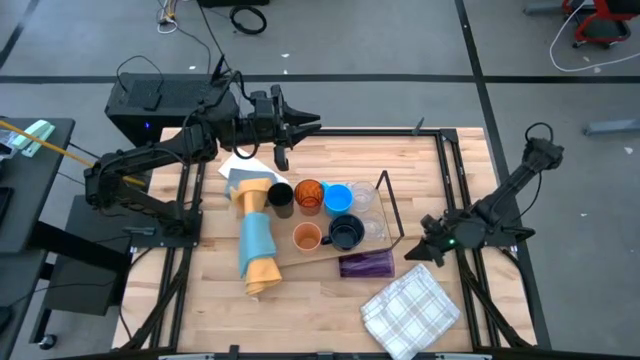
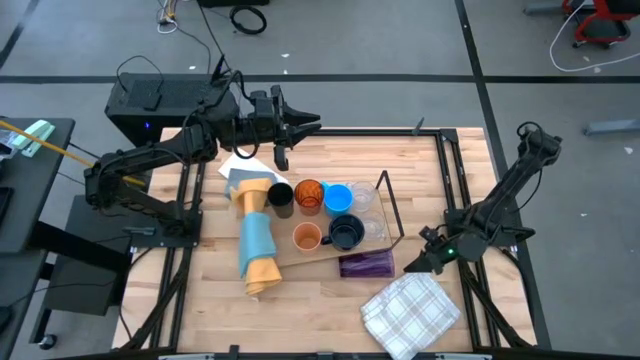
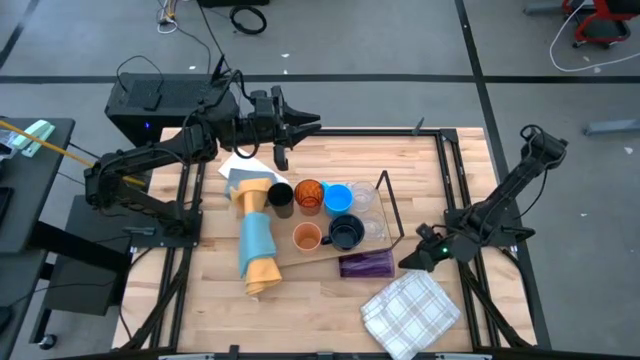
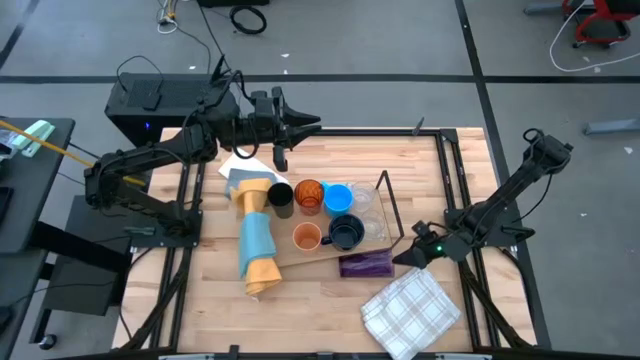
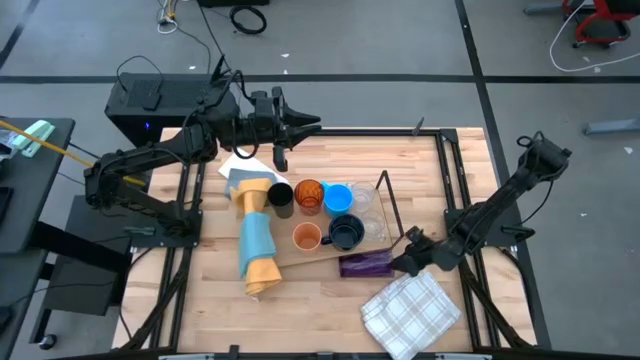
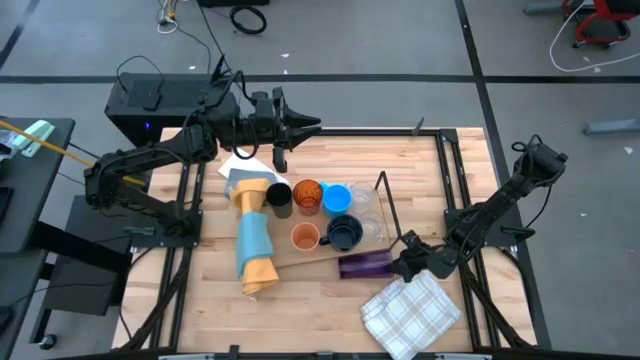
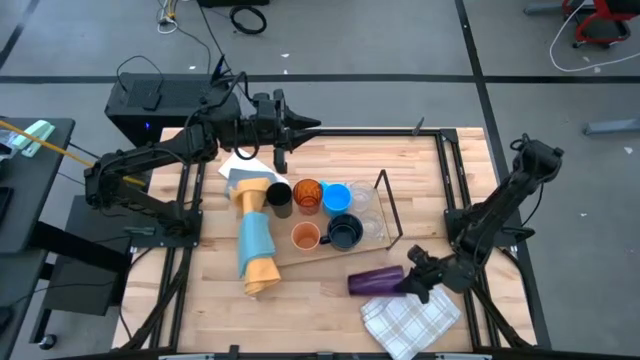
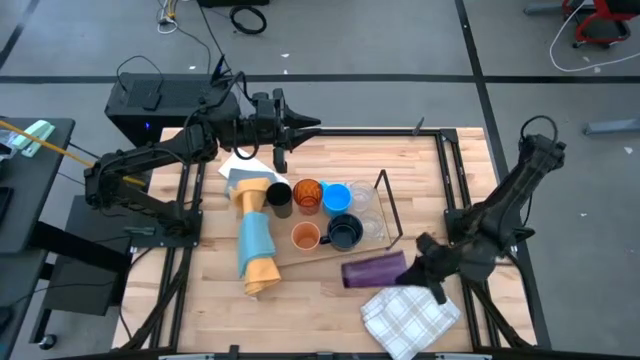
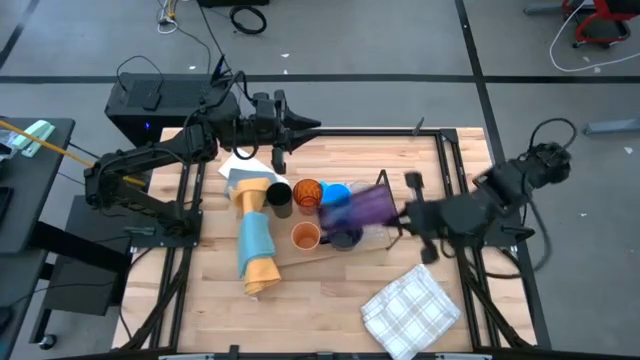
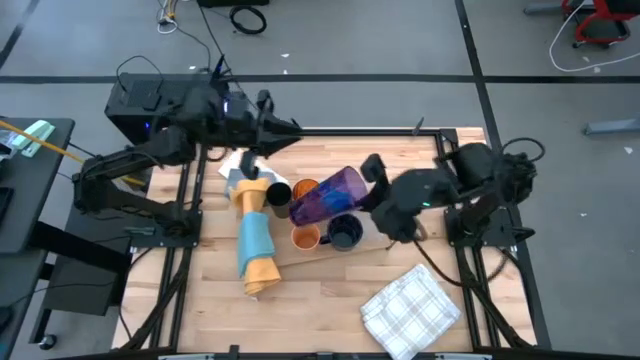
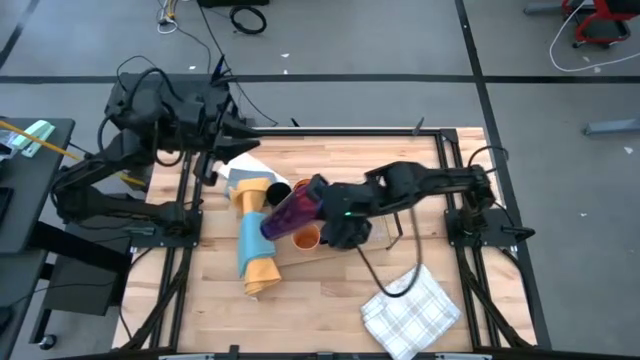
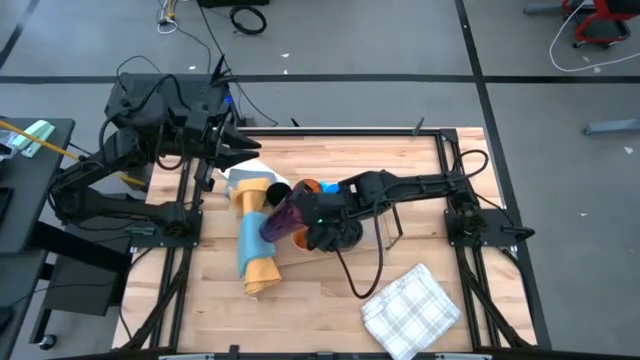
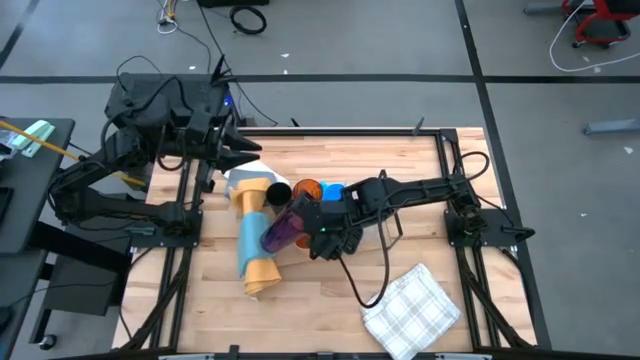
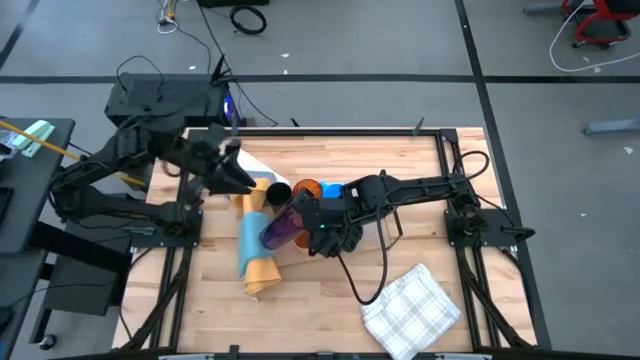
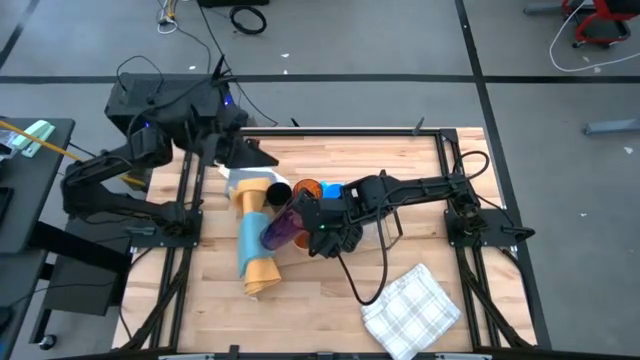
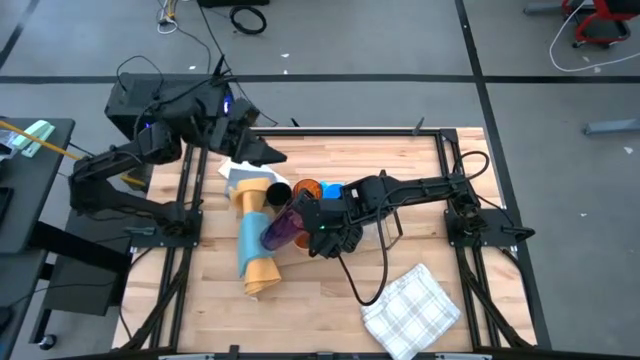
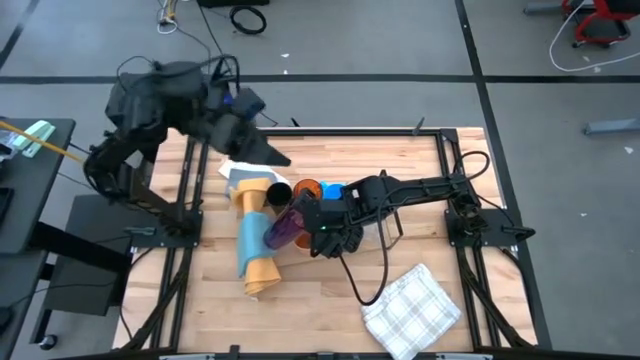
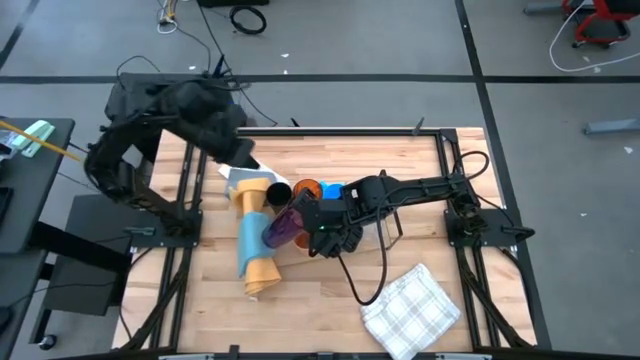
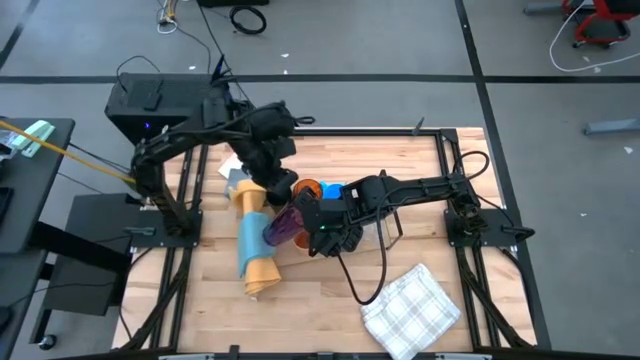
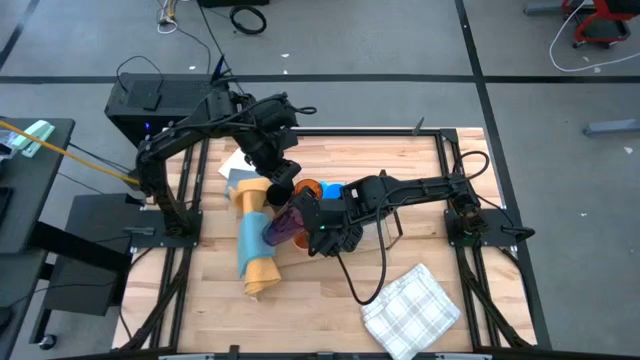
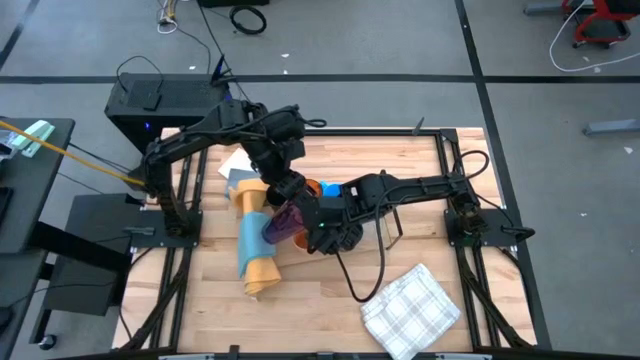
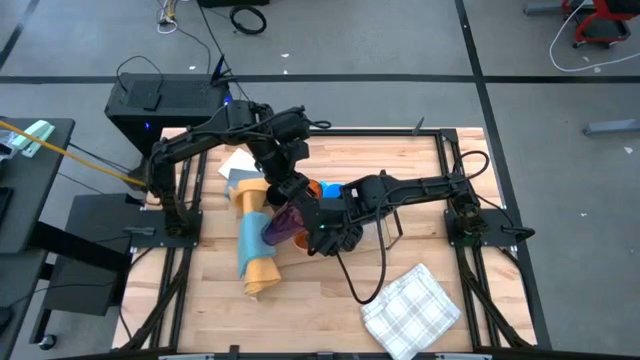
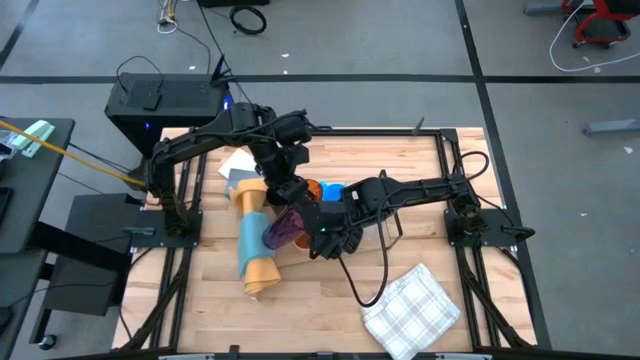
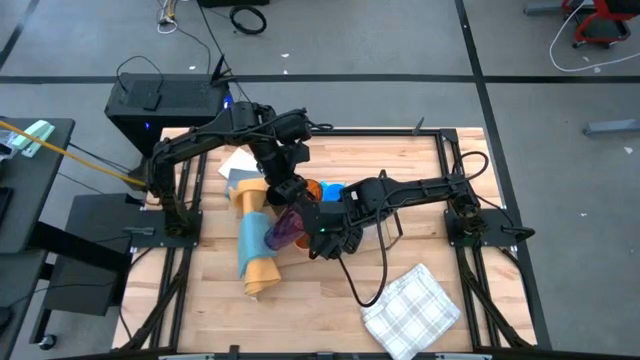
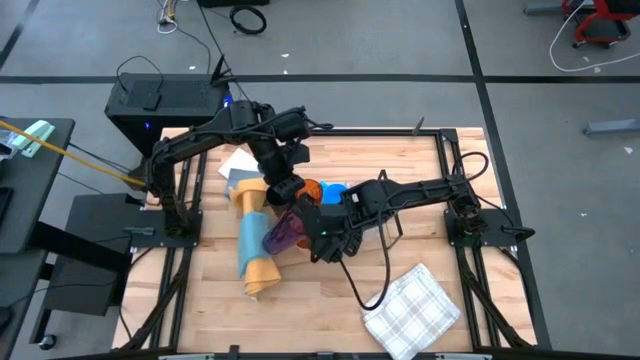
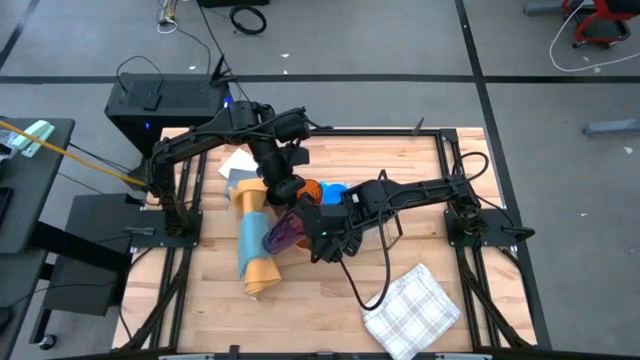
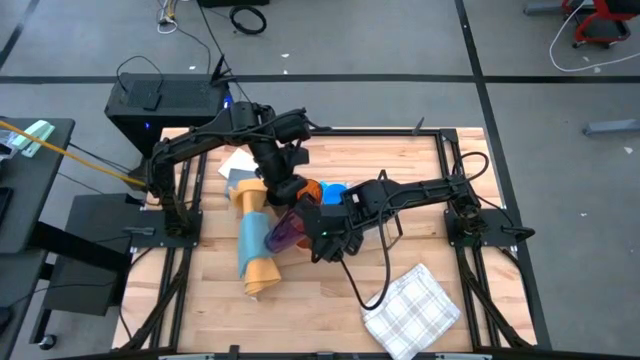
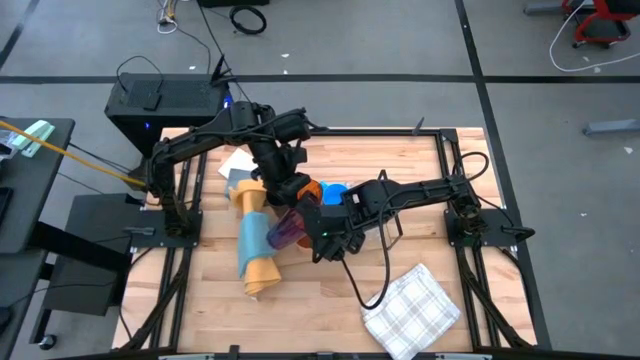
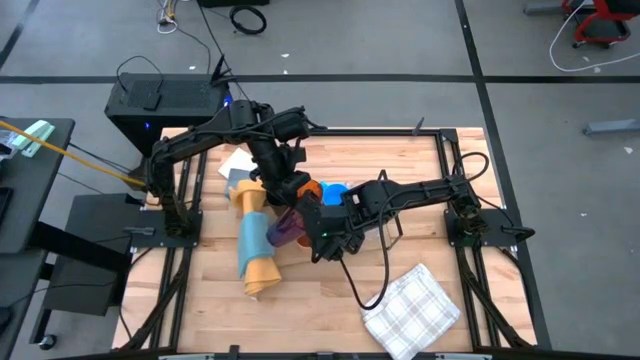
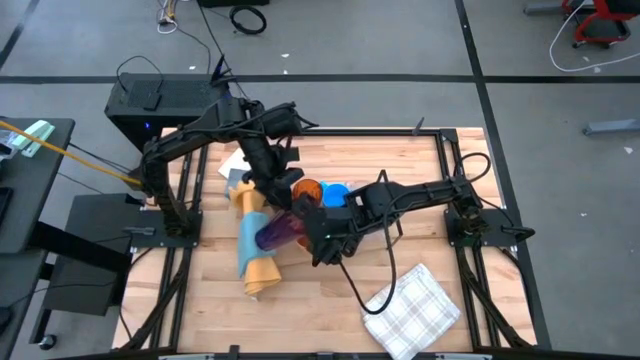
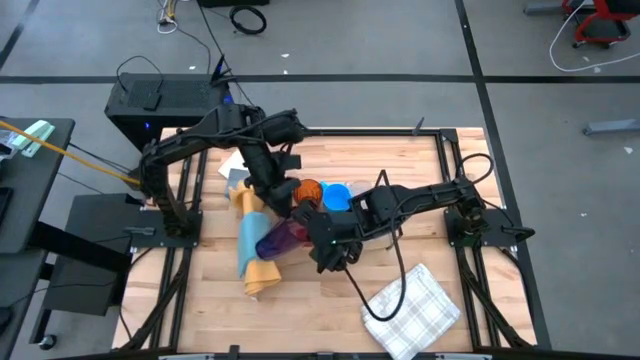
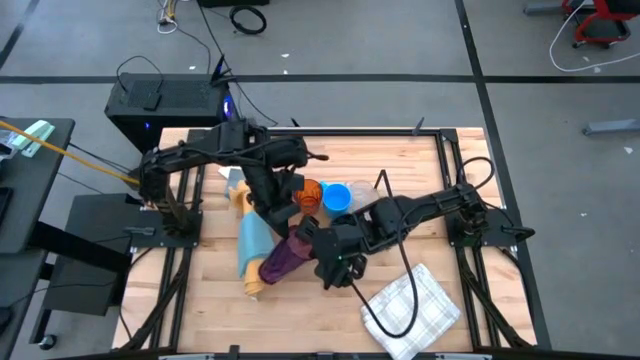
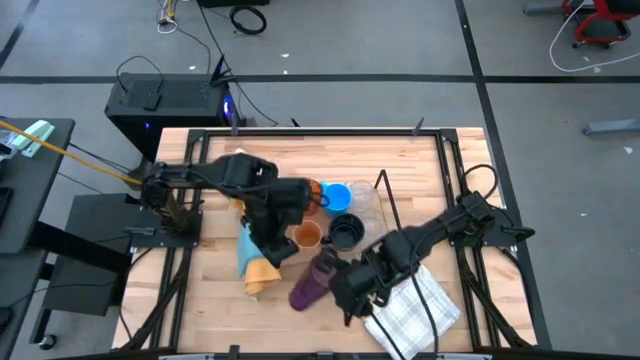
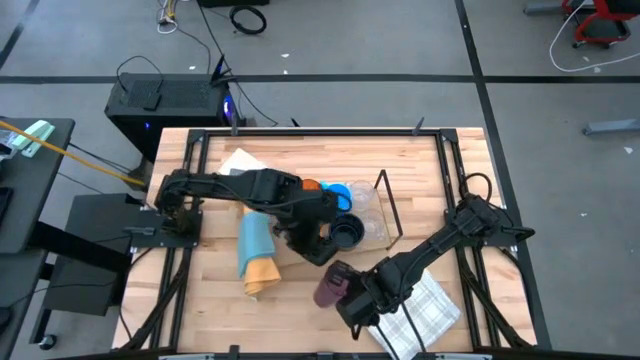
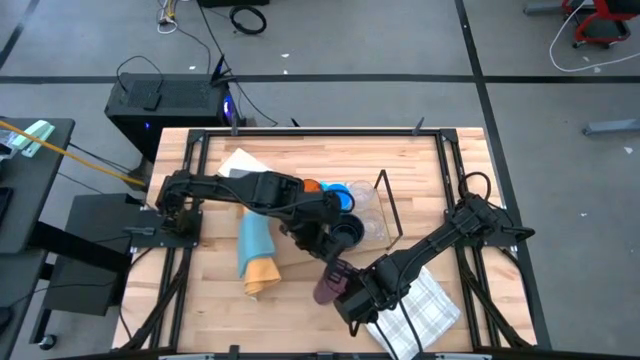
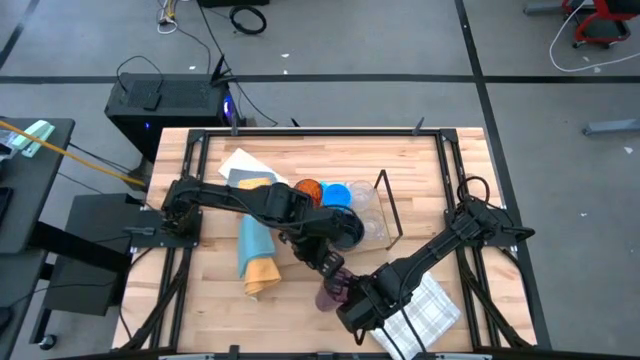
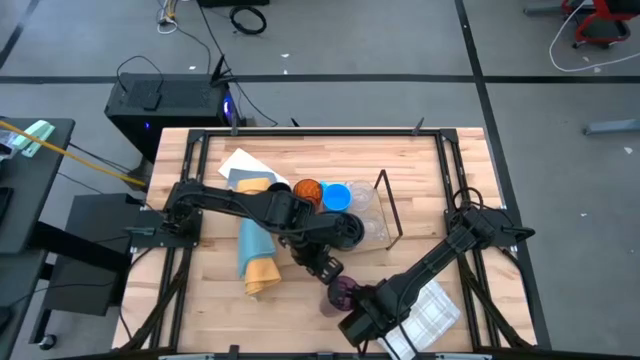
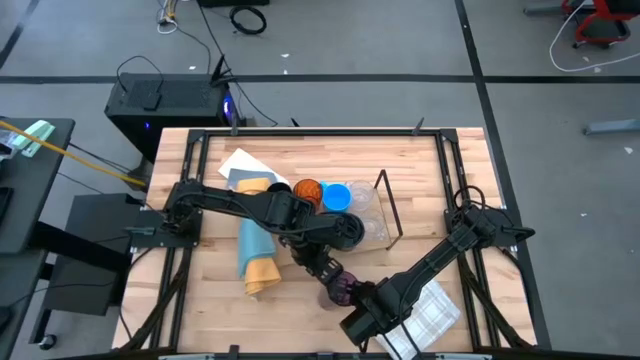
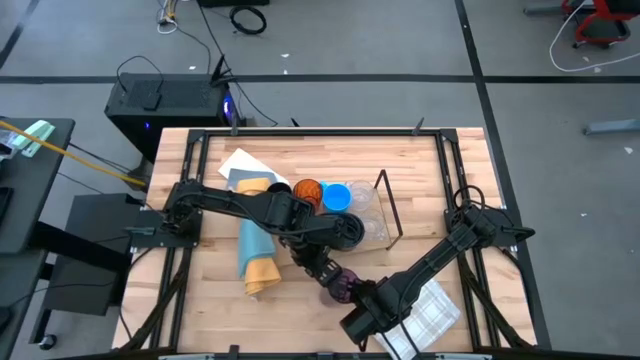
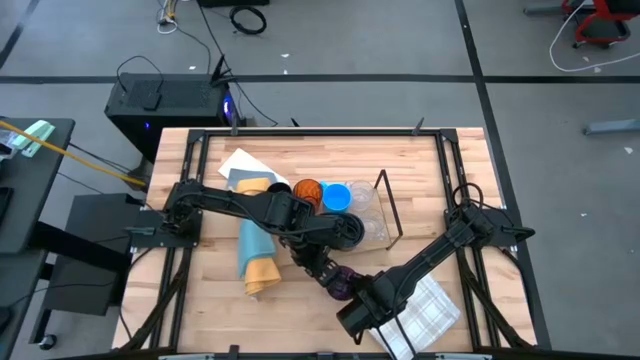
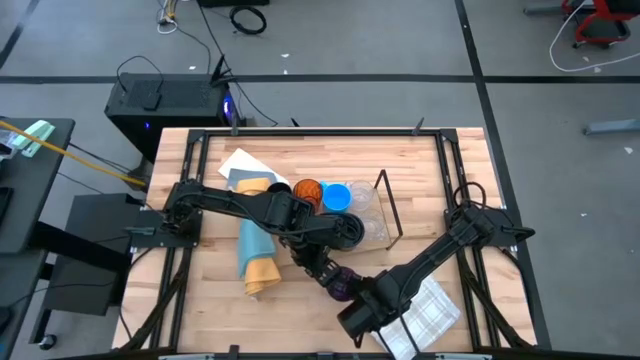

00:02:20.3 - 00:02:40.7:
Task: Stack small to large cups/mugs on shelf
Put the violet cup on the shelf

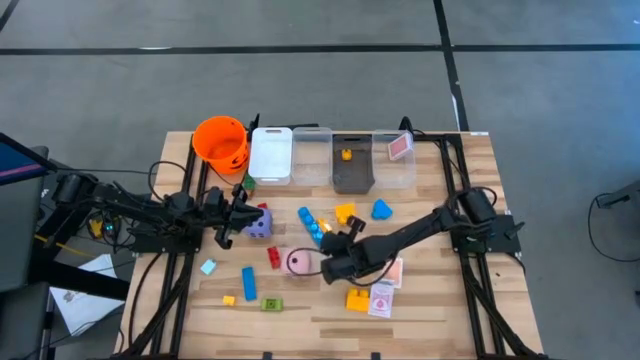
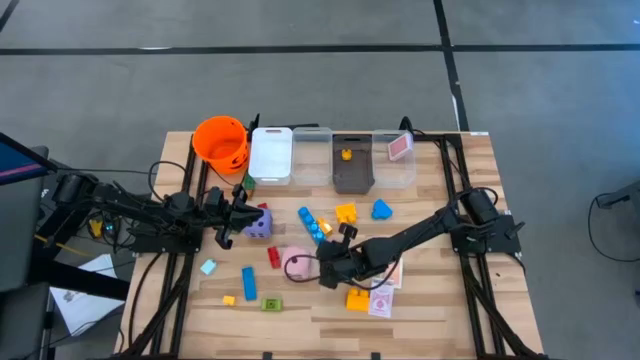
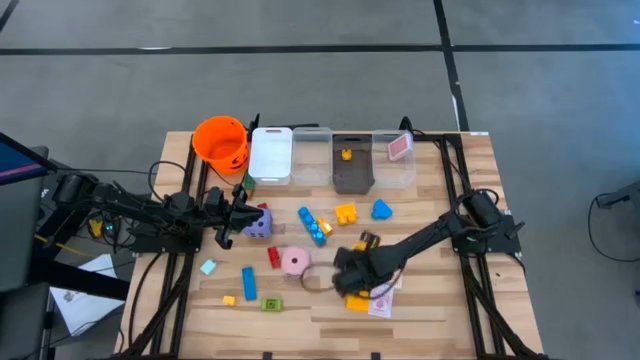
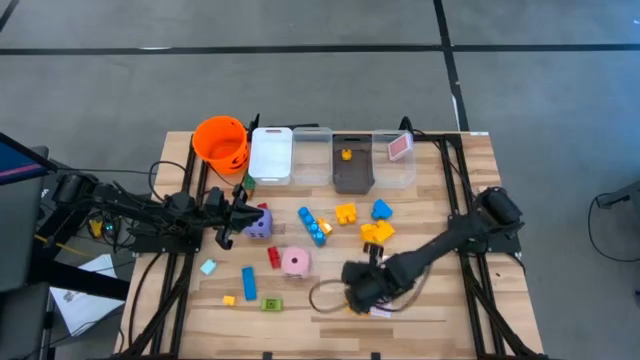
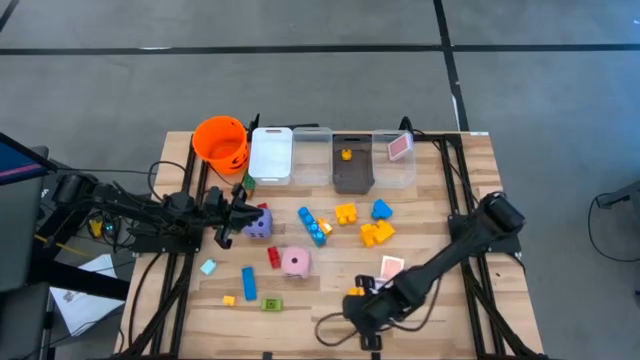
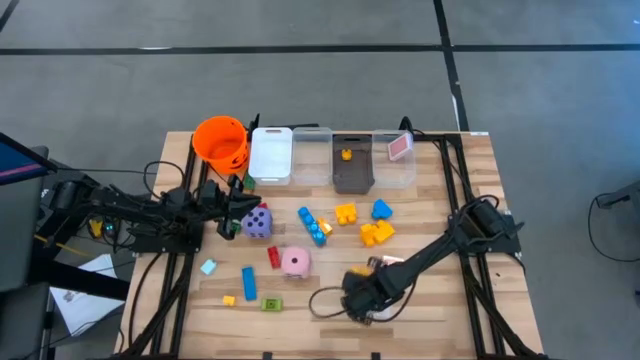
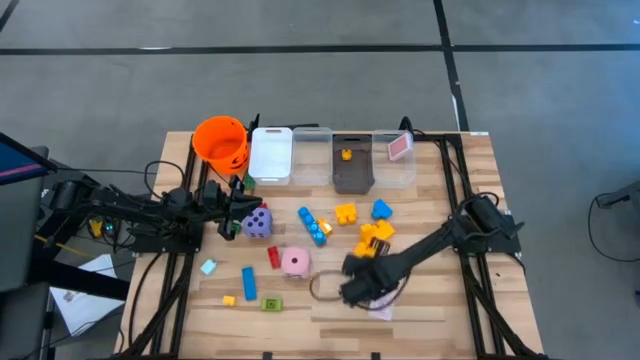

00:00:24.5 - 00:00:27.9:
Task: Pick & Place Toys
Adjust the yellow stud game pieces on the table
